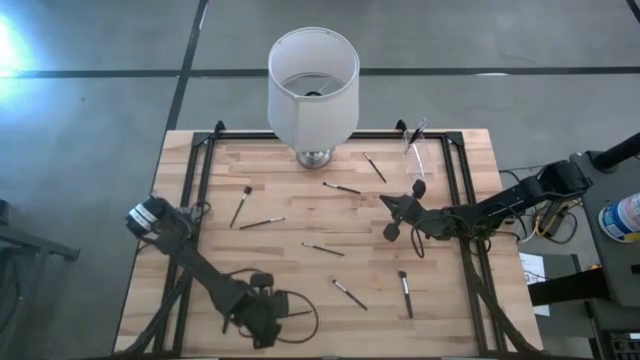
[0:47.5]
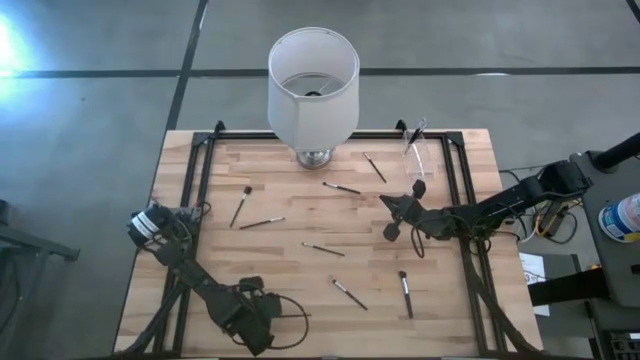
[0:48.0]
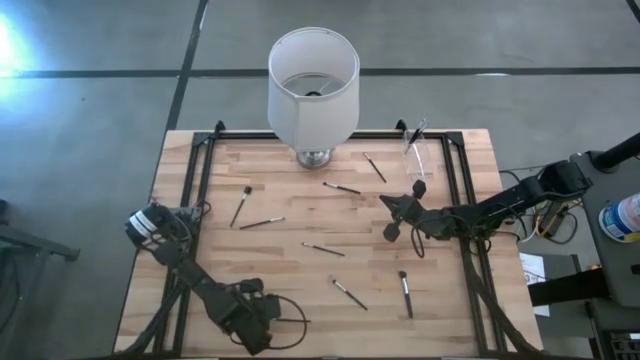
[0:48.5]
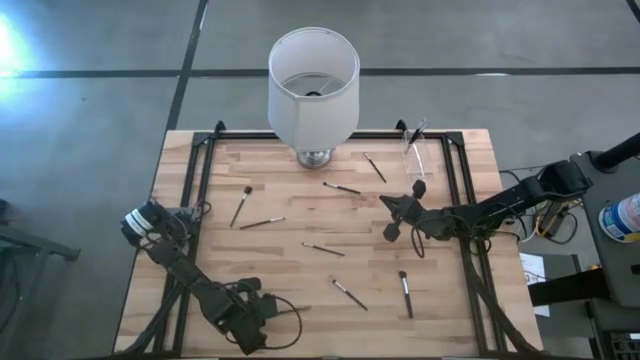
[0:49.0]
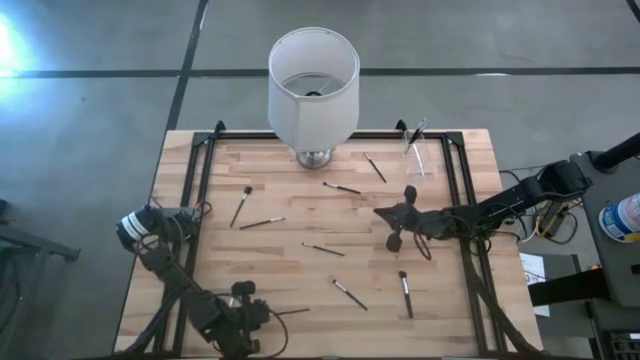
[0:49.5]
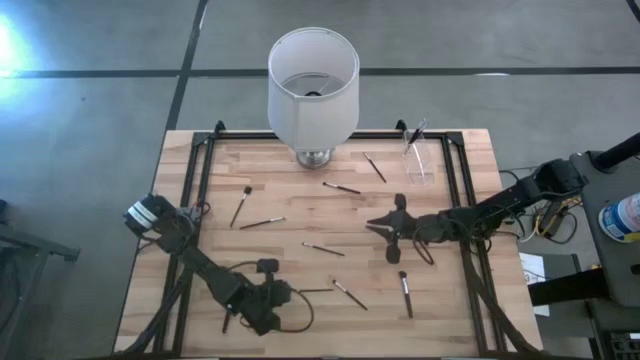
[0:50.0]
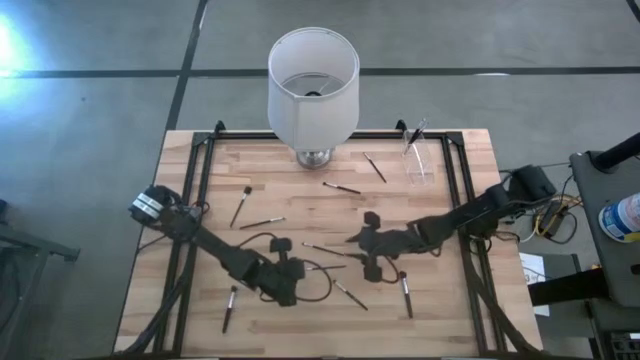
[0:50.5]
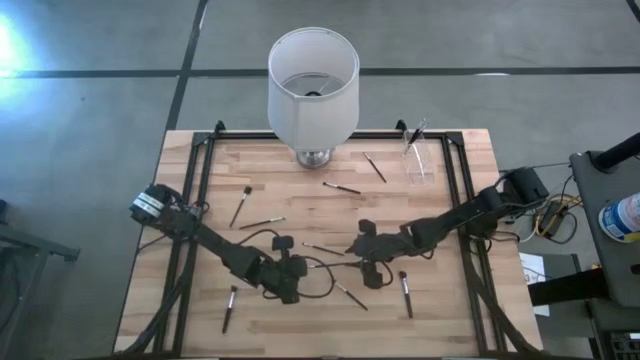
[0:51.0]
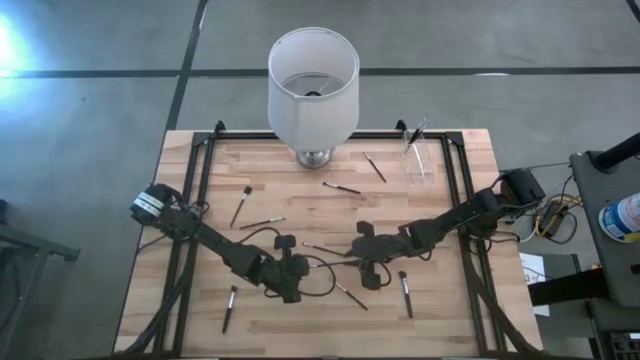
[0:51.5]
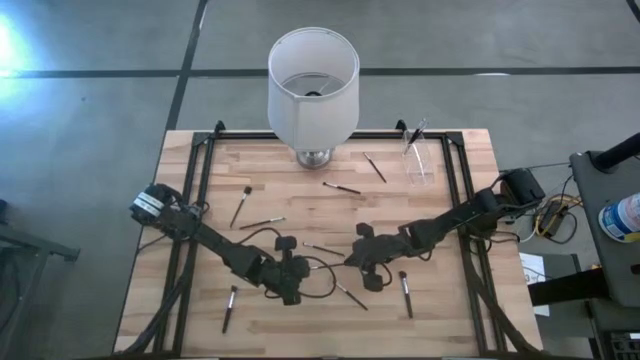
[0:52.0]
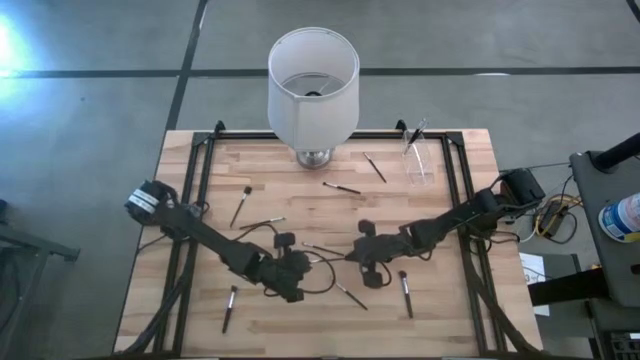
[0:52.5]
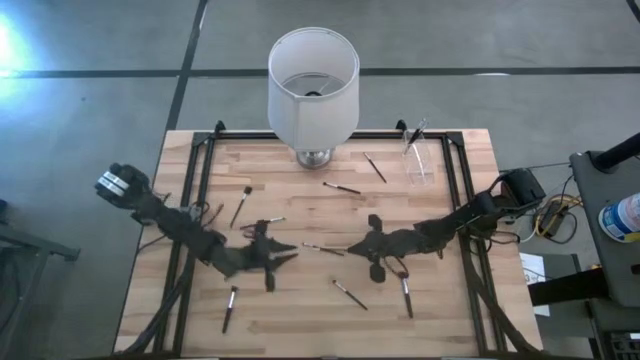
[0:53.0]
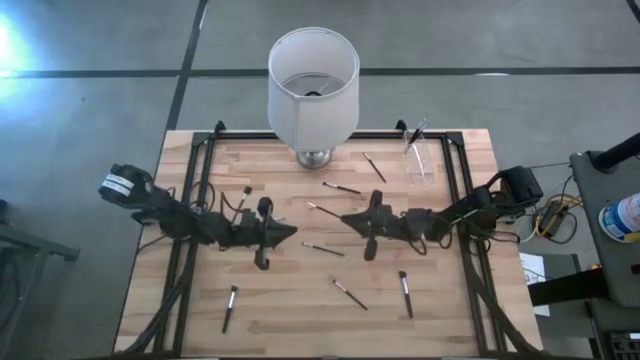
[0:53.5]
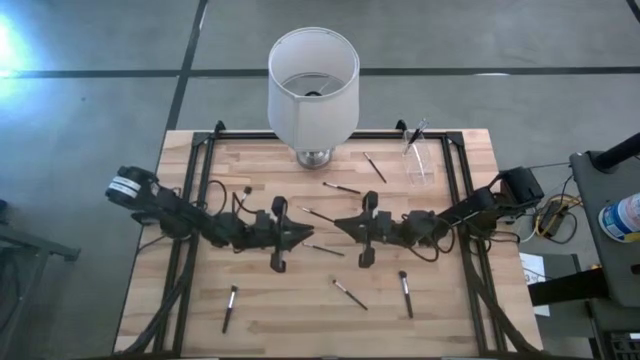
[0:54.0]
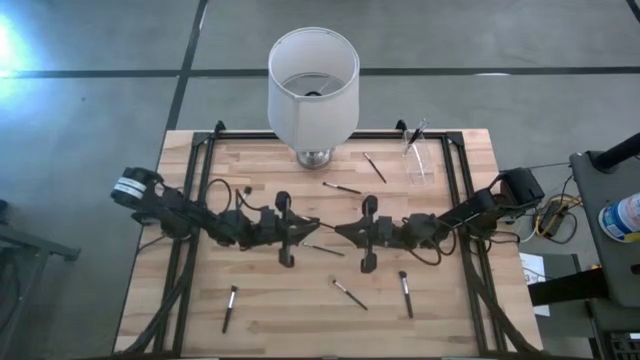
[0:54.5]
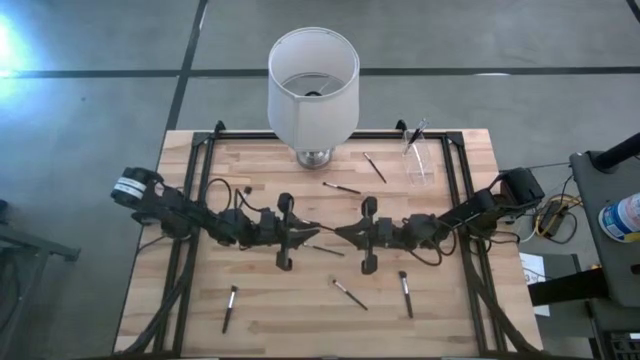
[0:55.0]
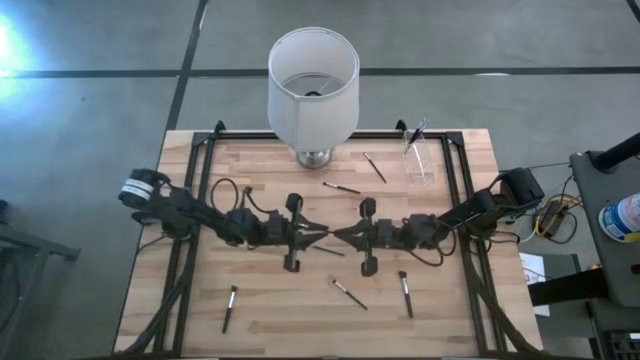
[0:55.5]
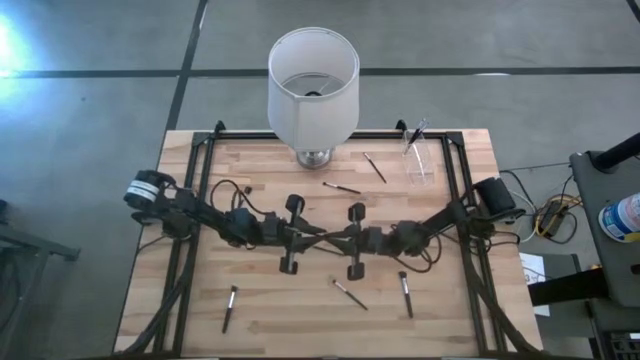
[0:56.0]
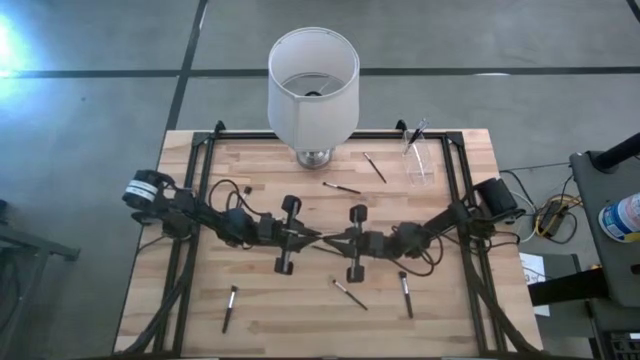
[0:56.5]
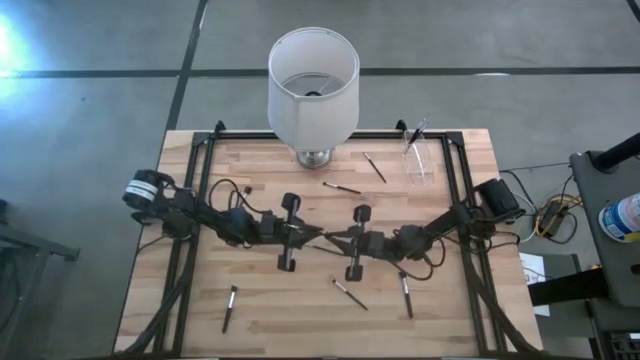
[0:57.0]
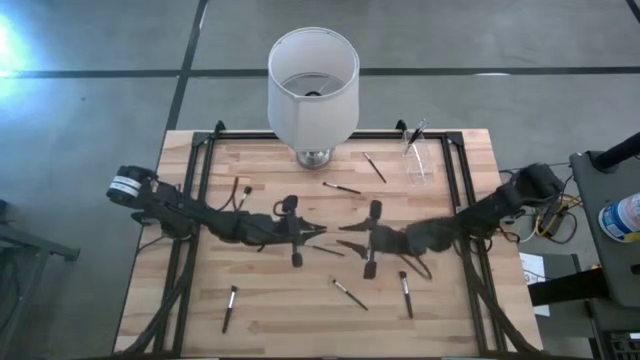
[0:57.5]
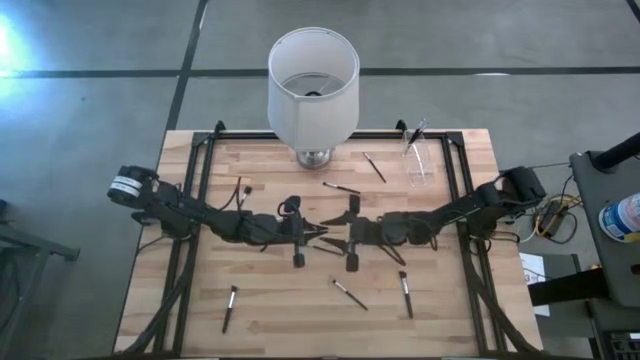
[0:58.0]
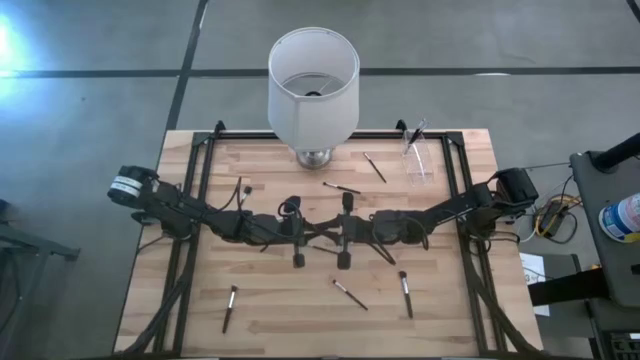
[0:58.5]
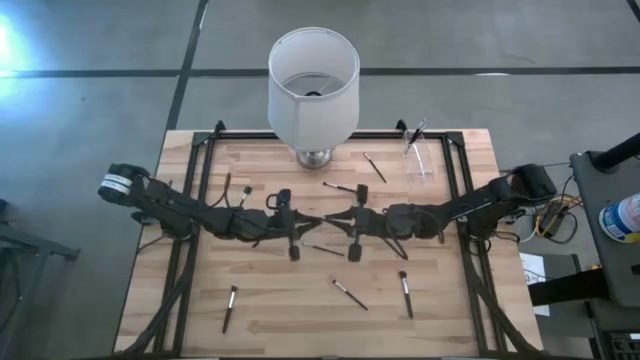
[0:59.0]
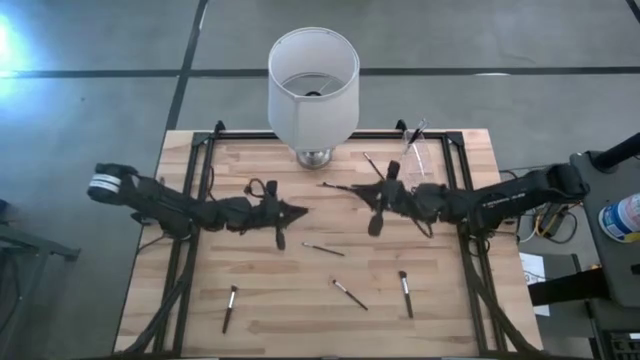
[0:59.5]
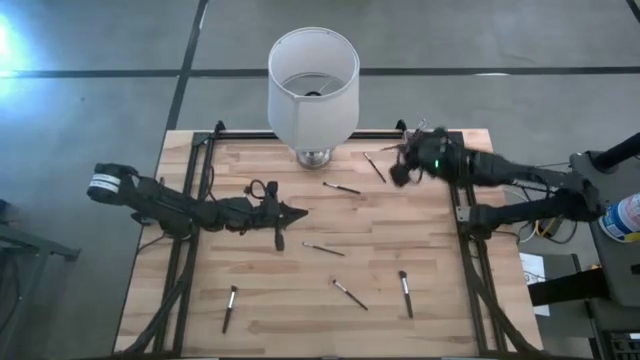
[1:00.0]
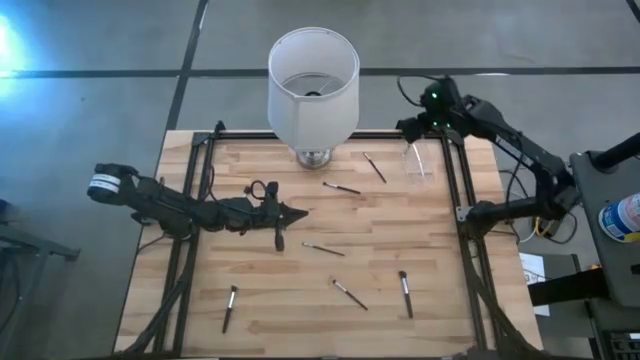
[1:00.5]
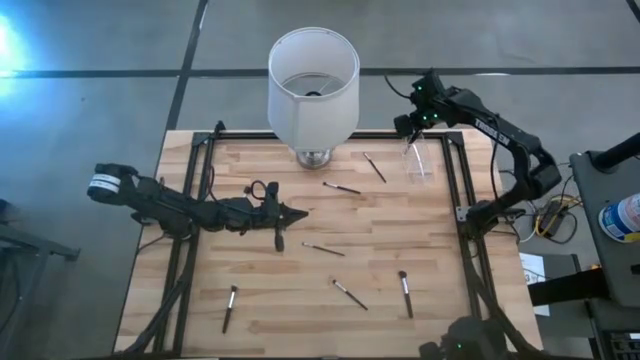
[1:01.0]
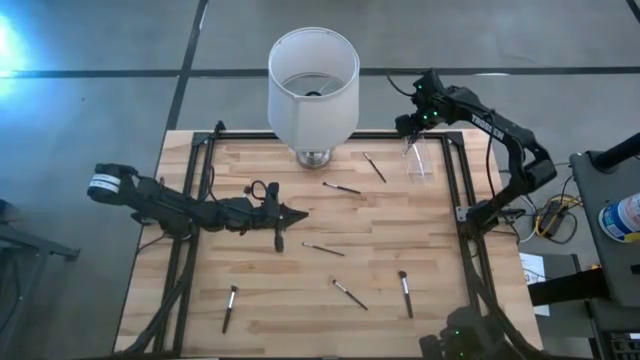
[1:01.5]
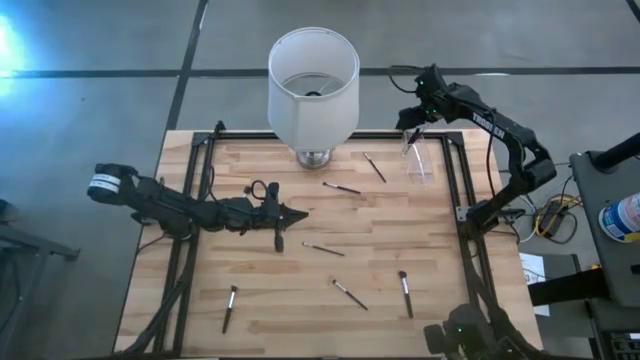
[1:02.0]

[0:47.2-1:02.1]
Task: Put items in baskets/containers
Put the eyeshadow brush into the transparent organizer

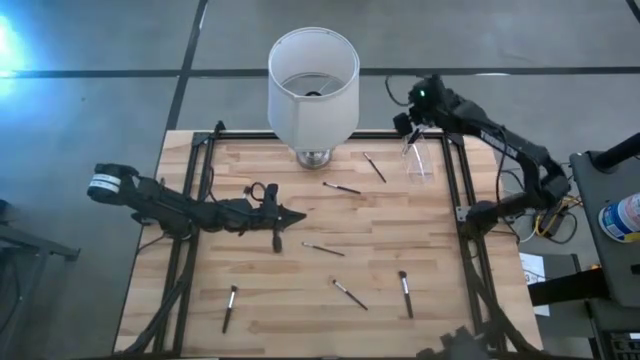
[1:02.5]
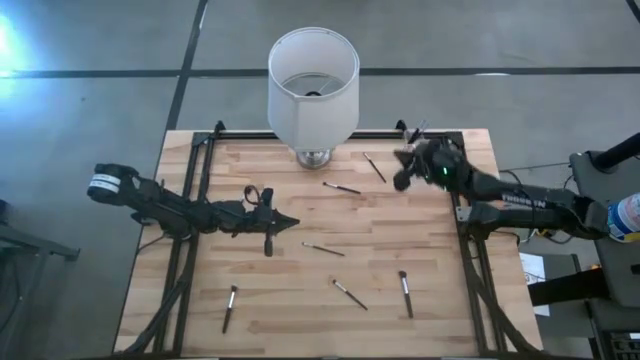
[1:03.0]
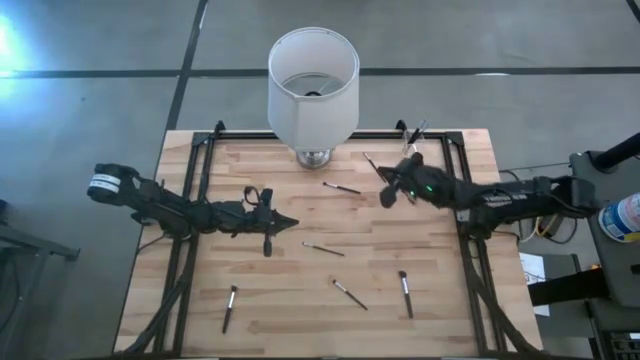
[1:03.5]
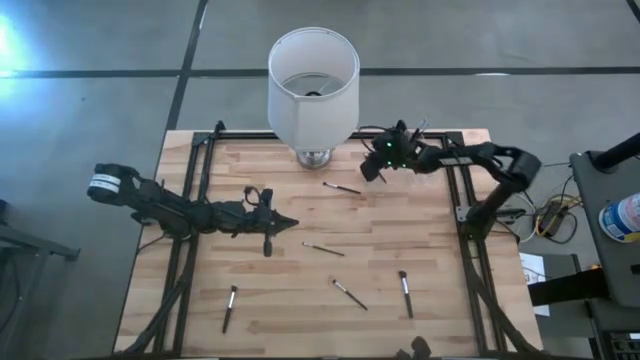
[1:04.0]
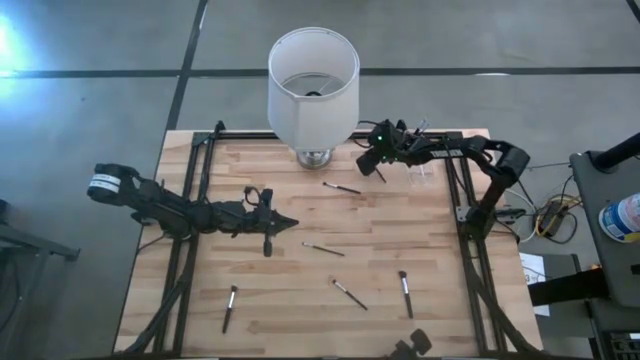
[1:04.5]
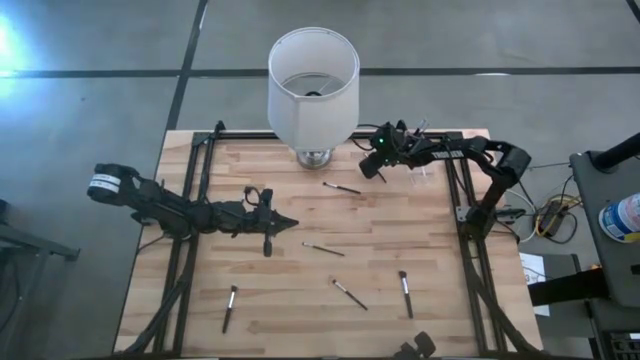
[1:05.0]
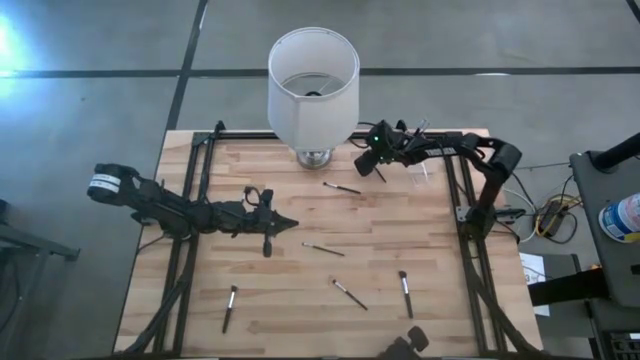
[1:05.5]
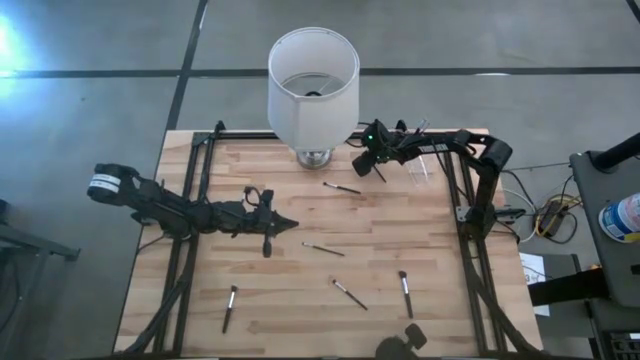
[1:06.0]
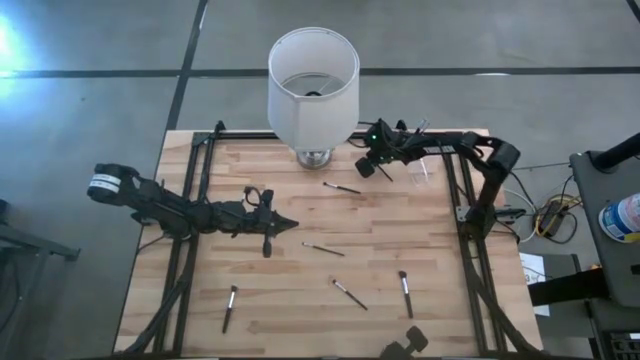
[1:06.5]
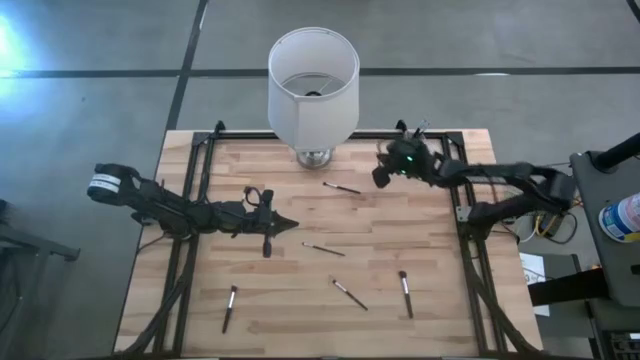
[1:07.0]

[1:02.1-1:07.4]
Put the eyeshadow brush into the transparent organizer
